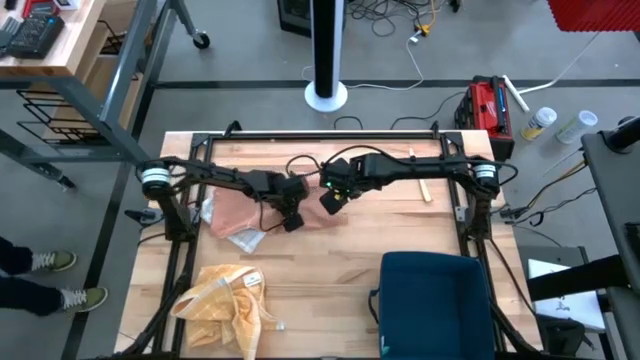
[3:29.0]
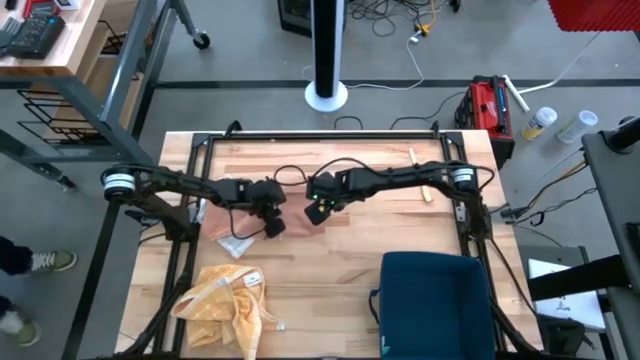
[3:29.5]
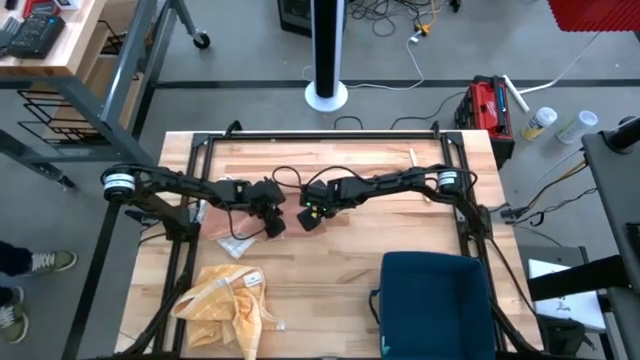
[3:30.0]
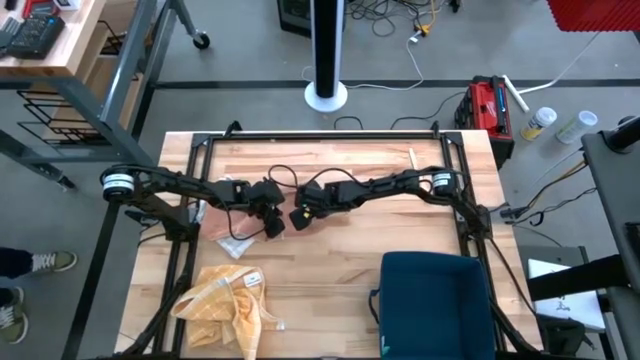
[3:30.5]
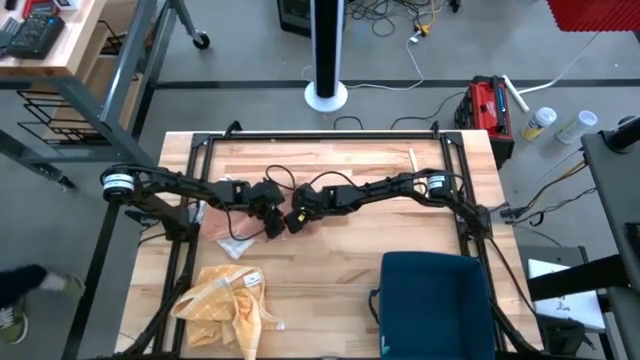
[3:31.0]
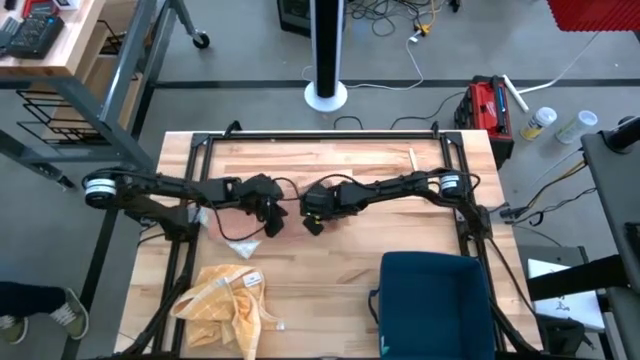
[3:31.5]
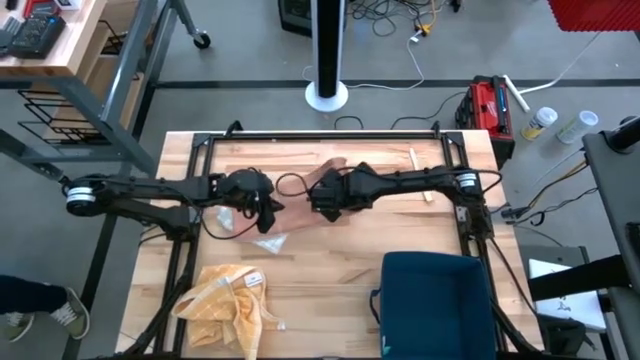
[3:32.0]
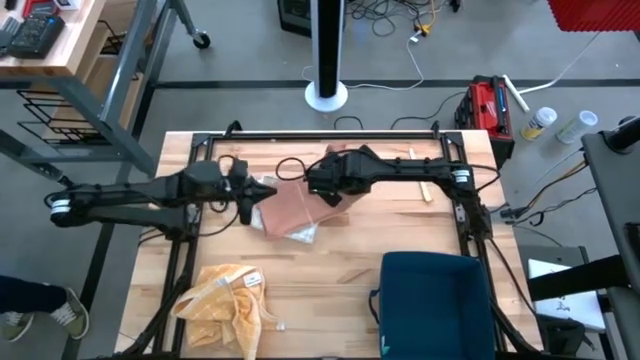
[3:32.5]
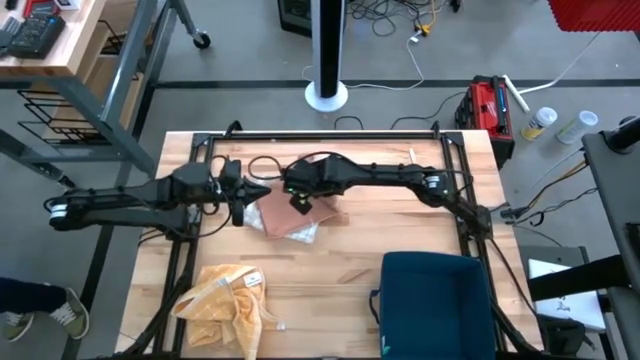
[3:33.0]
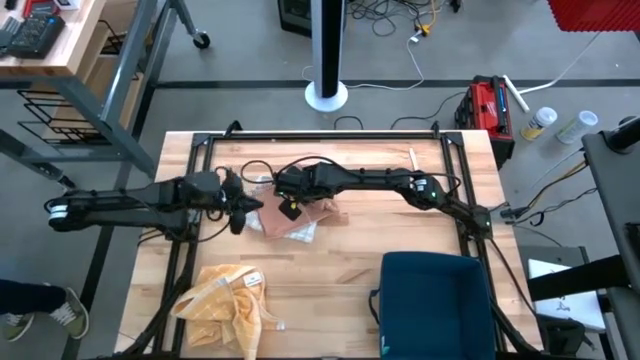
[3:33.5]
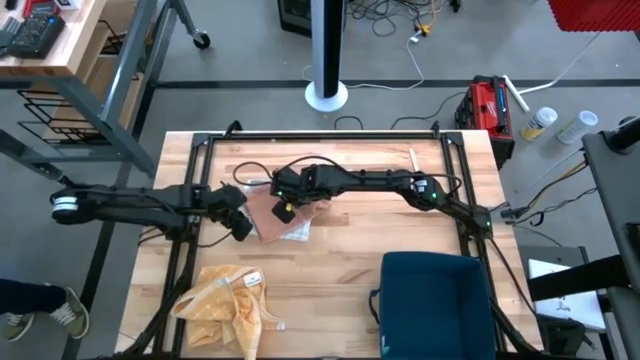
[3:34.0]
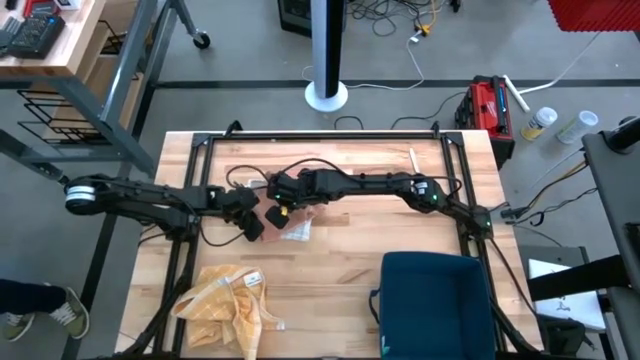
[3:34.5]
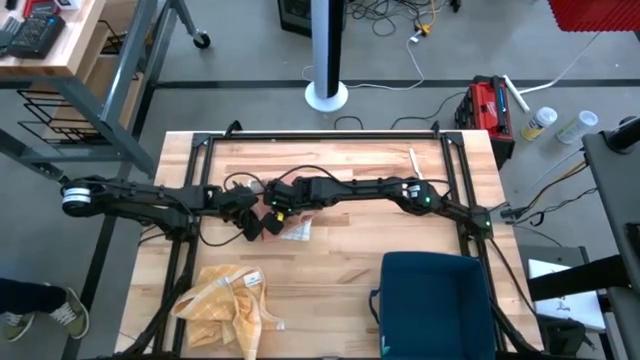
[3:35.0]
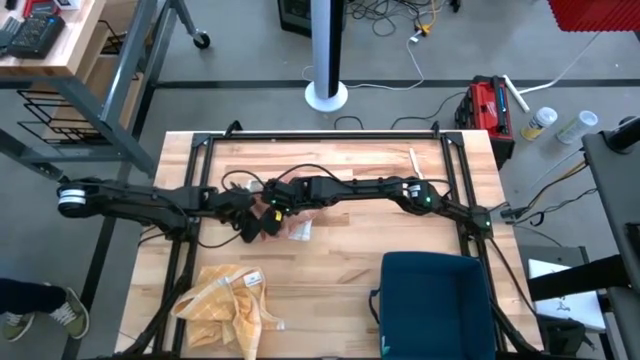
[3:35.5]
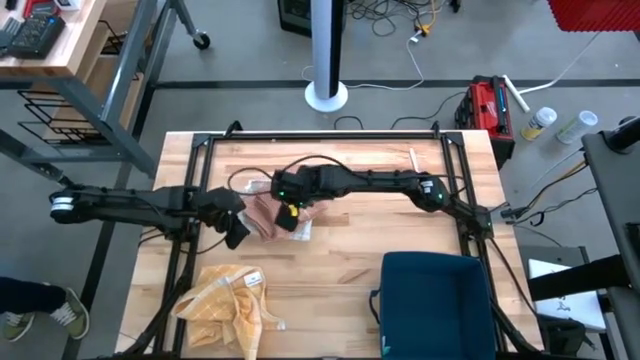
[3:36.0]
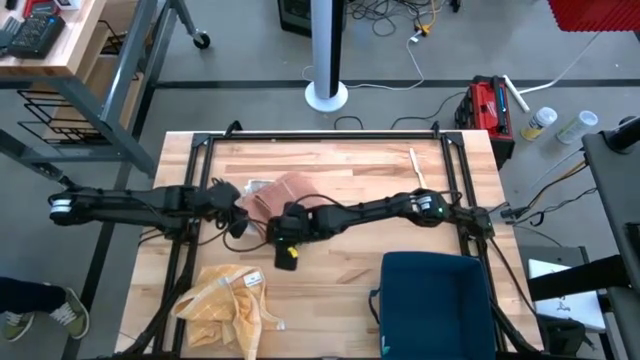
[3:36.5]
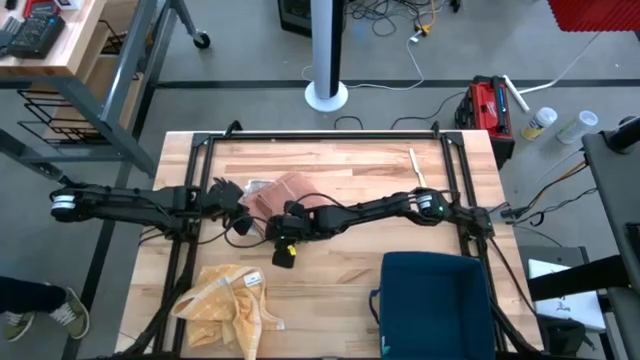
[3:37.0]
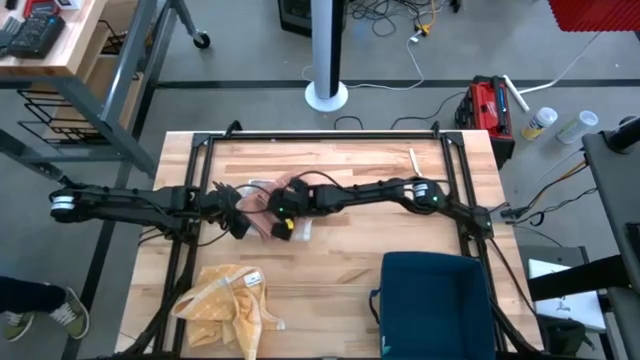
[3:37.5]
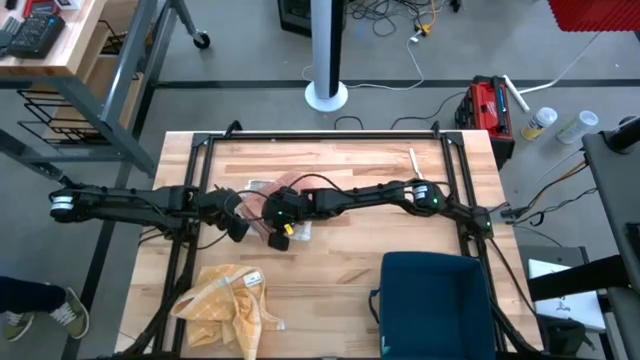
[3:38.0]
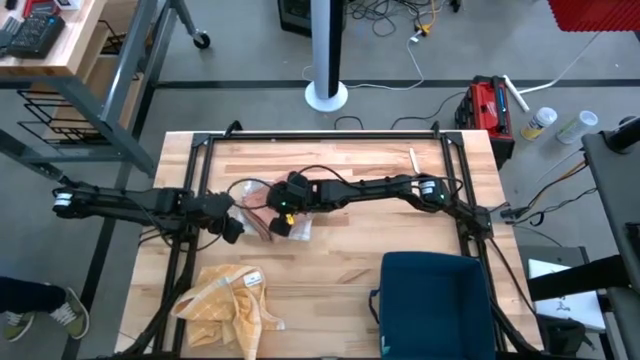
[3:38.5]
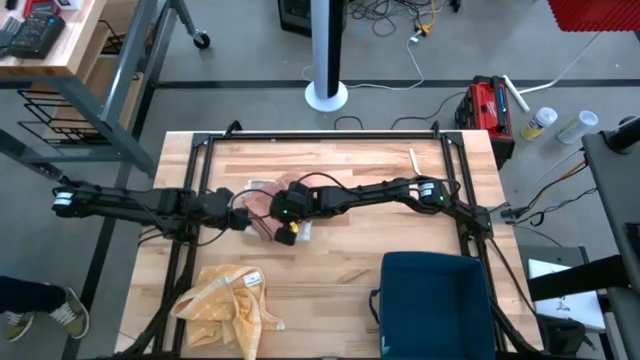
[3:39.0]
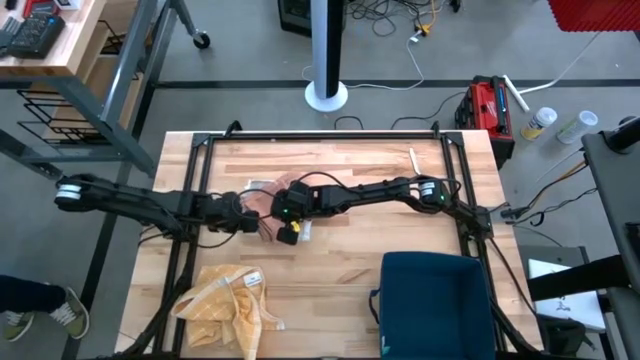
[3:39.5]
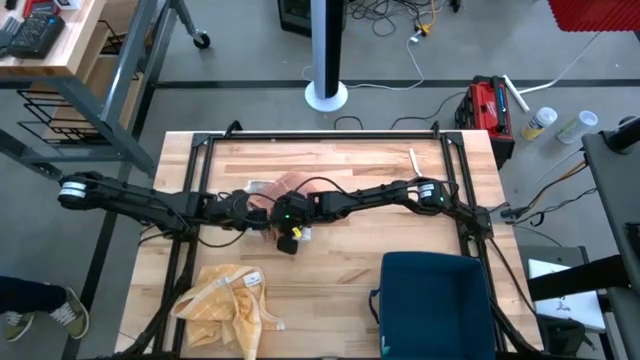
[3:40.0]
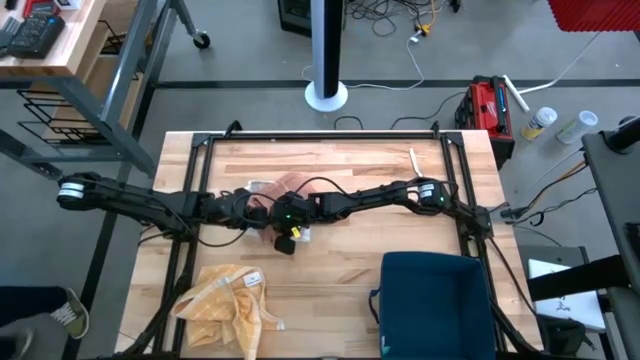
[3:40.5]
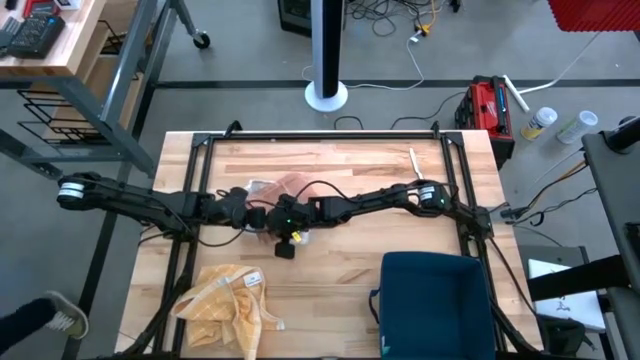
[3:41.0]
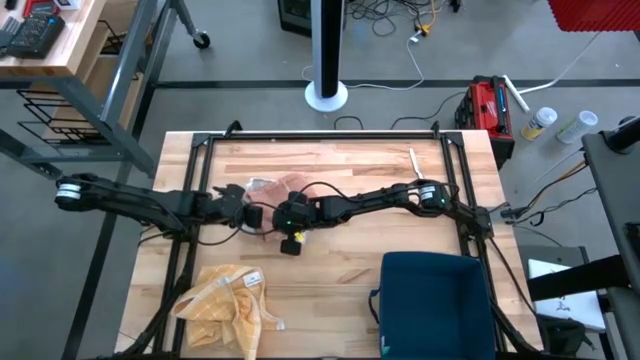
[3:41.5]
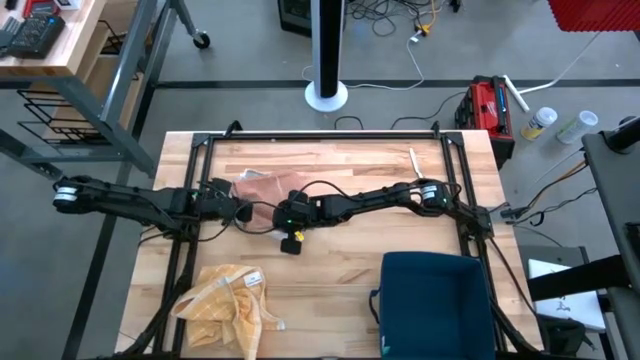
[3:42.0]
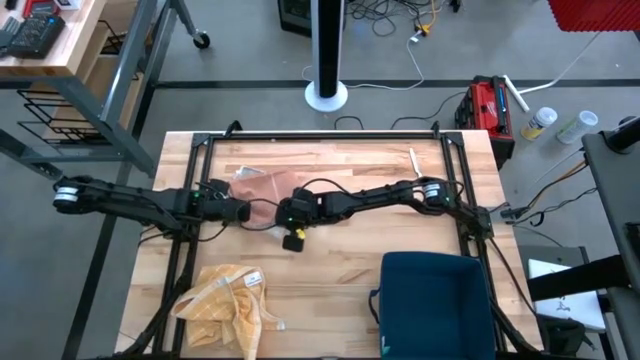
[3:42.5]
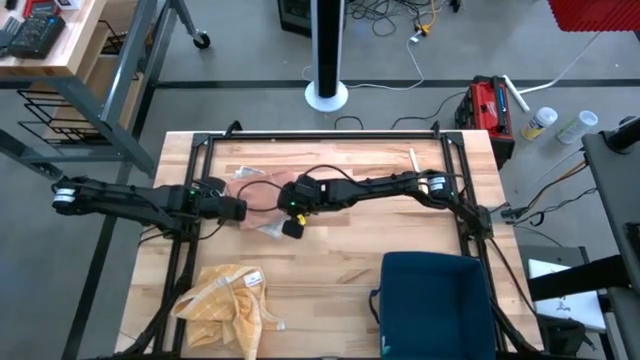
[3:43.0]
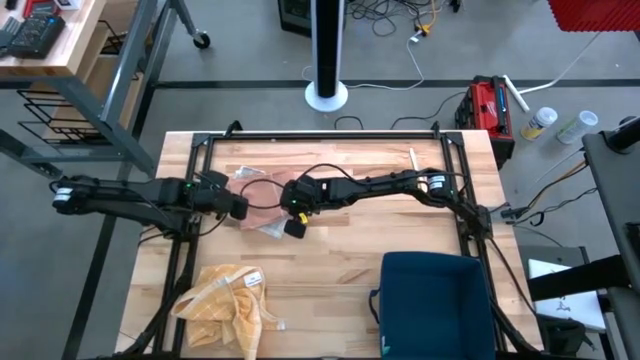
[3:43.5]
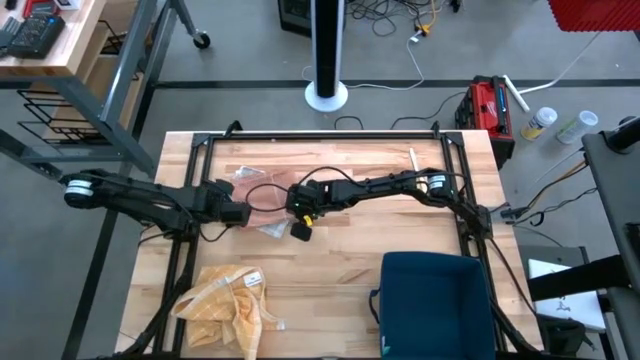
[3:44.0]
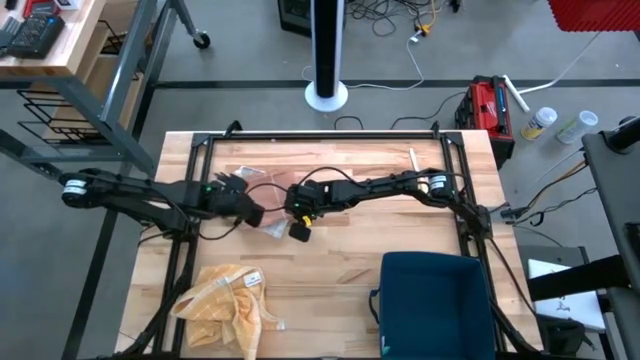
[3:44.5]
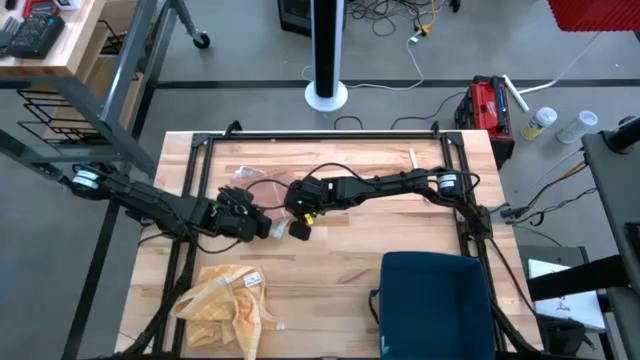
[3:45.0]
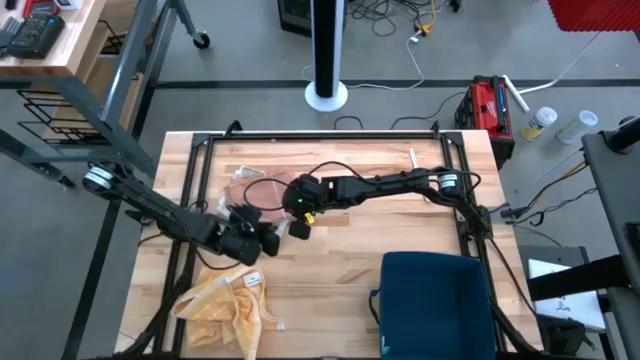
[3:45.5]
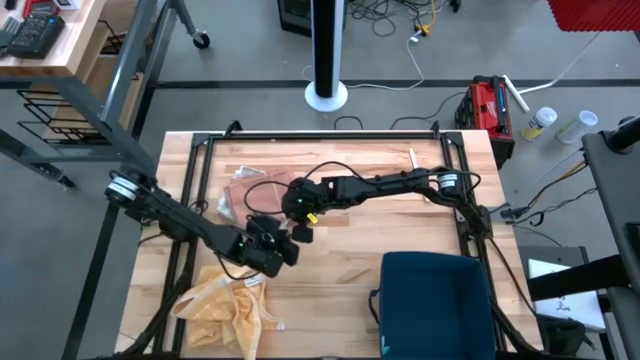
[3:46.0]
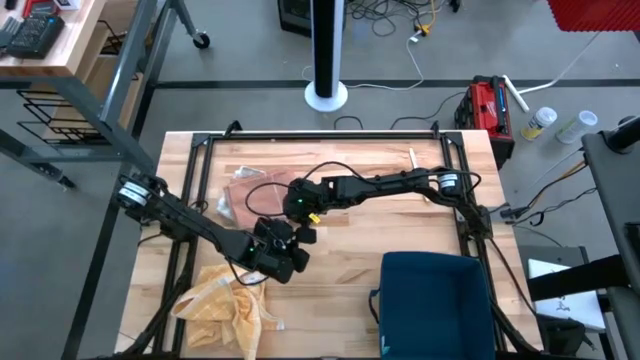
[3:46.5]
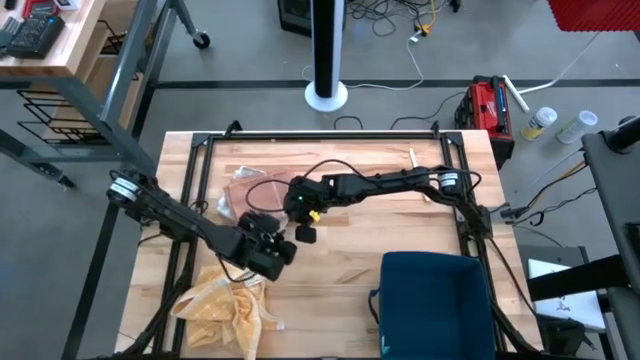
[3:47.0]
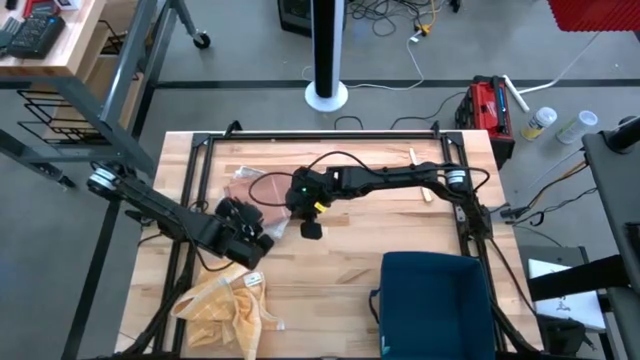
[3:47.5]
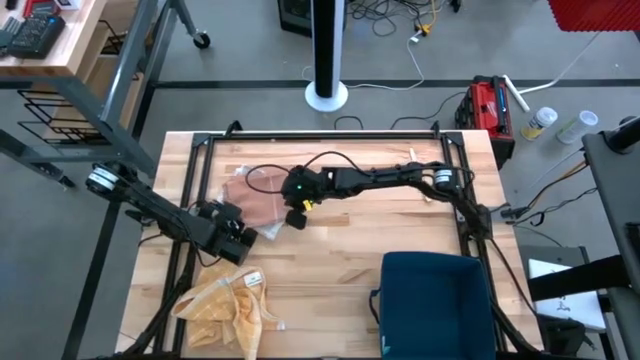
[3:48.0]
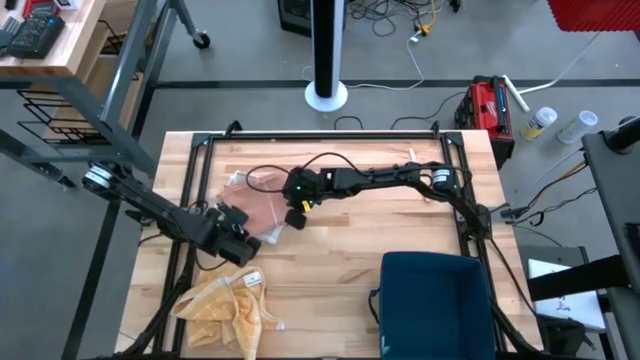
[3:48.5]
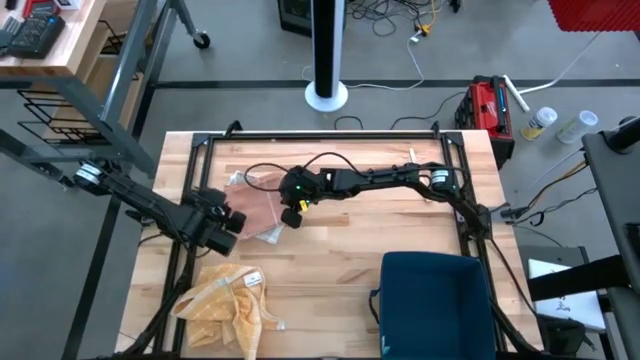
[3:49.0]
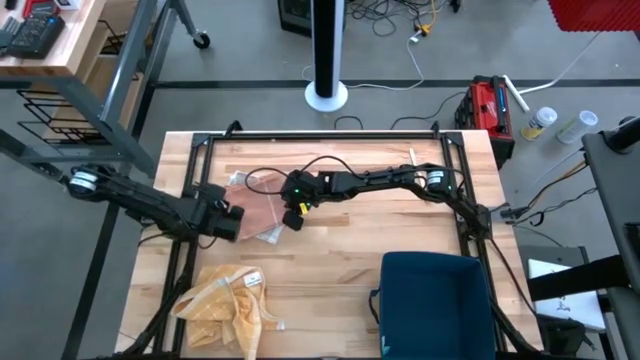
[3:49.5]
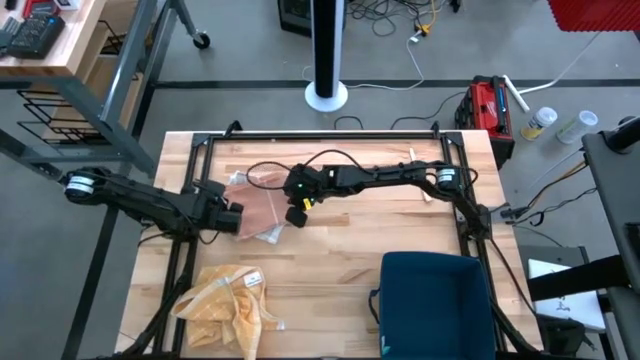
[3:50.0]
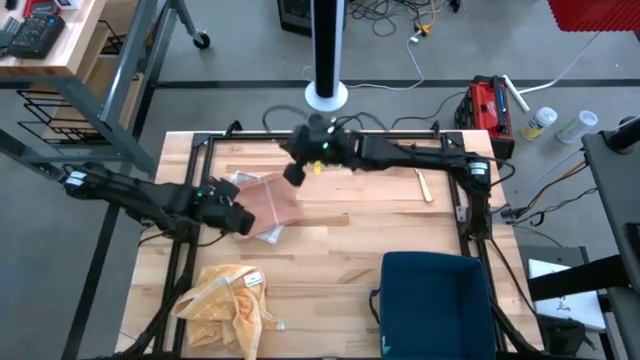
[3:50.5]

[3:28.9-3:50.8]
Task: Fold towel
Fold the brown towel
